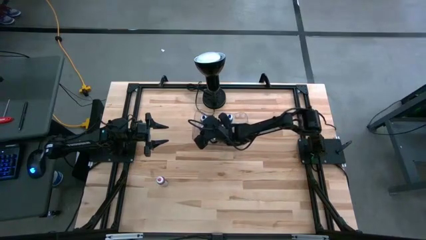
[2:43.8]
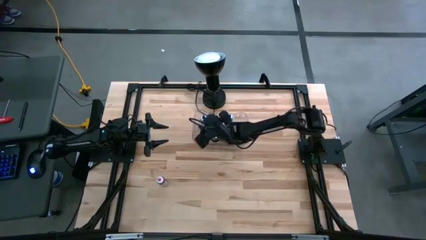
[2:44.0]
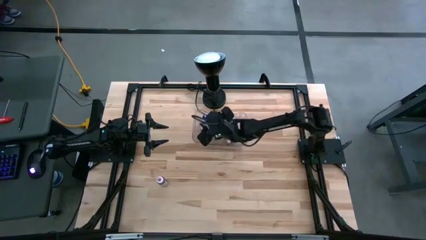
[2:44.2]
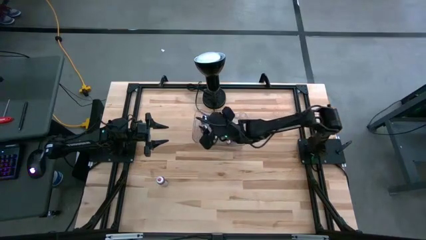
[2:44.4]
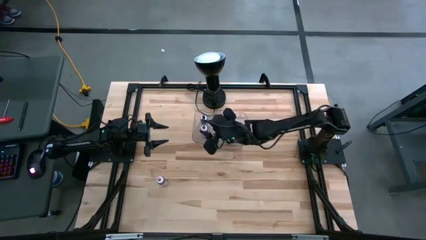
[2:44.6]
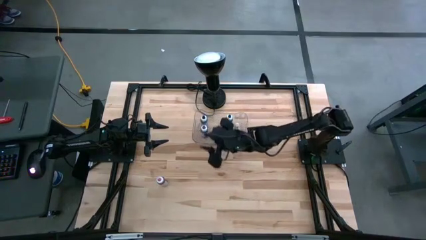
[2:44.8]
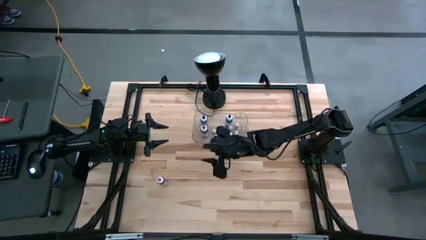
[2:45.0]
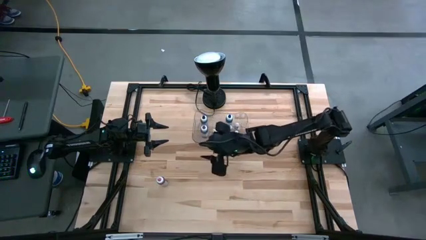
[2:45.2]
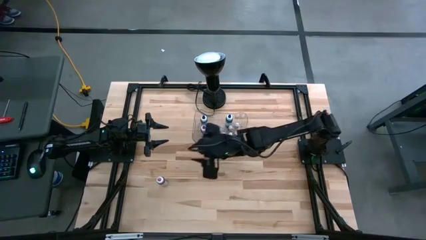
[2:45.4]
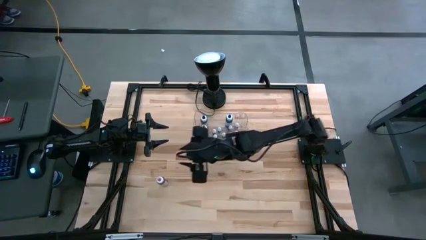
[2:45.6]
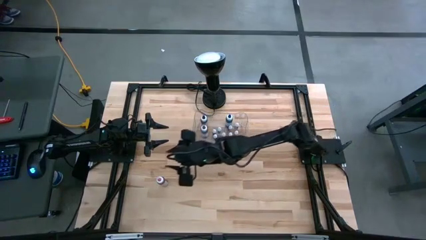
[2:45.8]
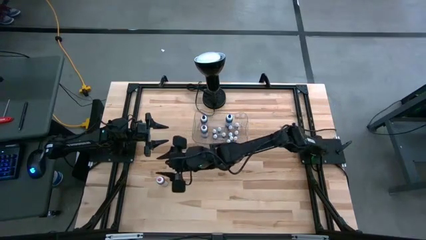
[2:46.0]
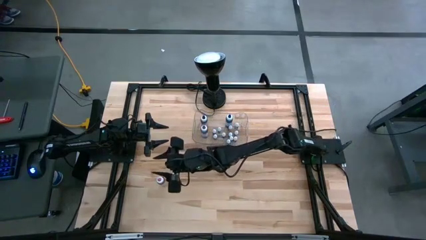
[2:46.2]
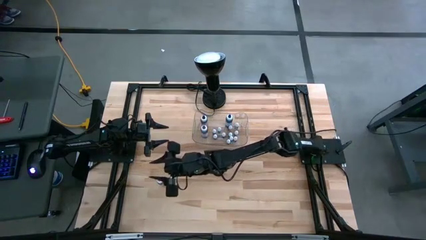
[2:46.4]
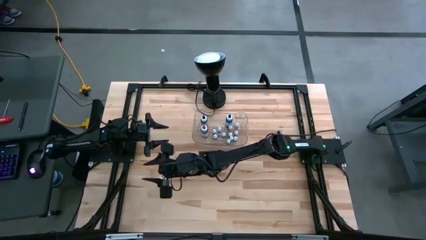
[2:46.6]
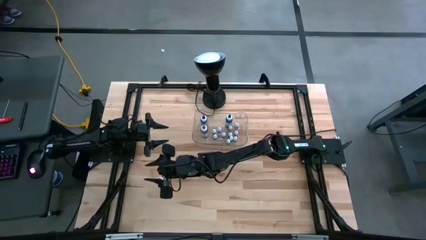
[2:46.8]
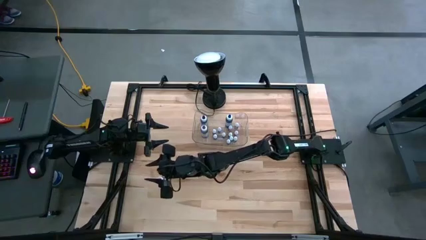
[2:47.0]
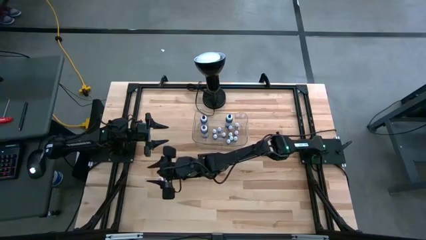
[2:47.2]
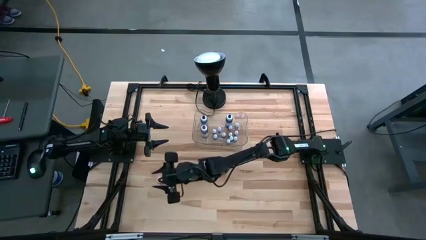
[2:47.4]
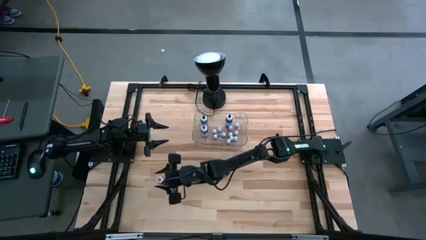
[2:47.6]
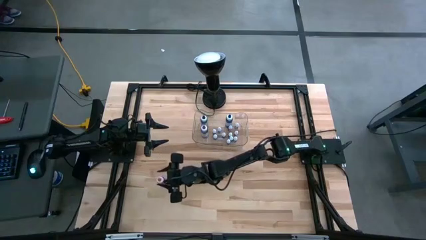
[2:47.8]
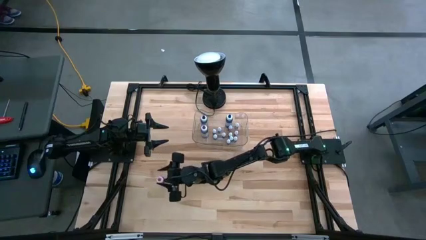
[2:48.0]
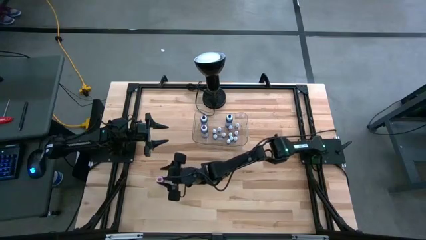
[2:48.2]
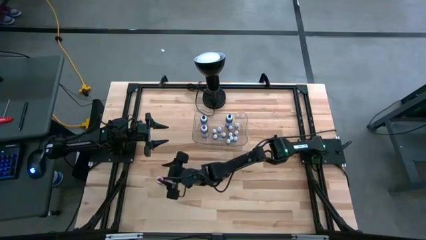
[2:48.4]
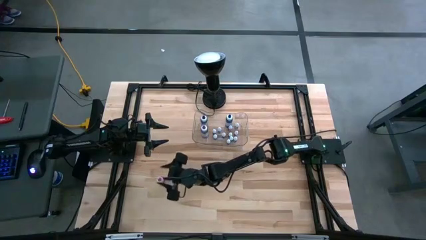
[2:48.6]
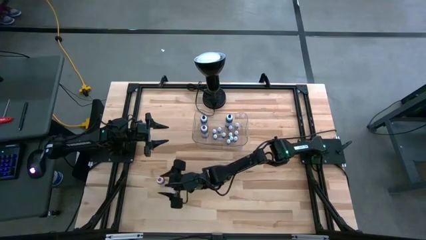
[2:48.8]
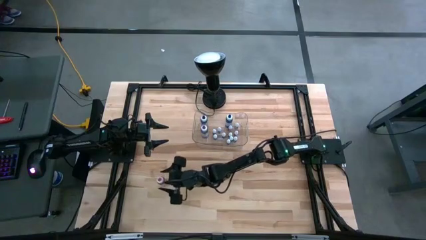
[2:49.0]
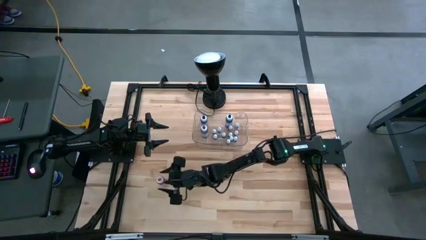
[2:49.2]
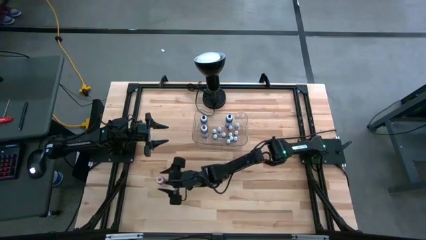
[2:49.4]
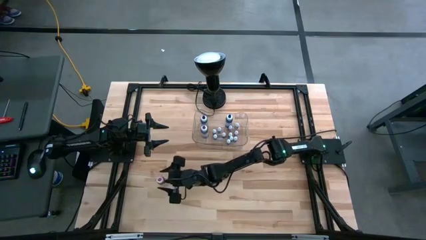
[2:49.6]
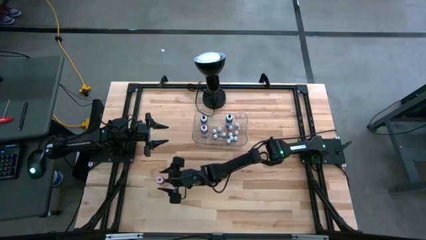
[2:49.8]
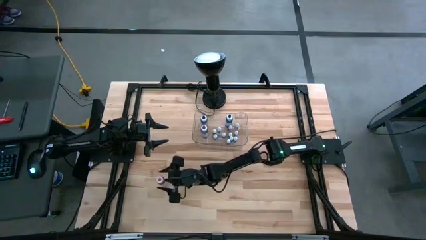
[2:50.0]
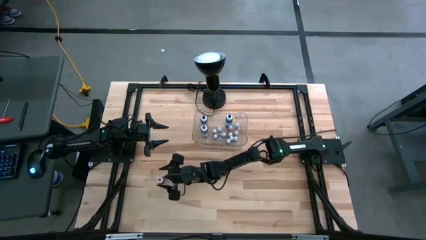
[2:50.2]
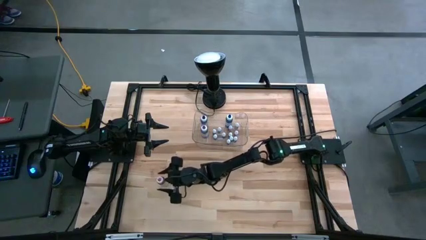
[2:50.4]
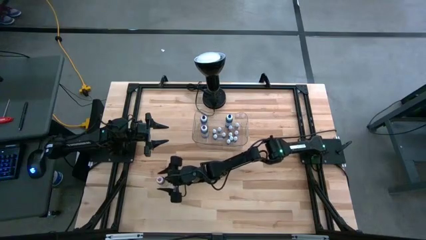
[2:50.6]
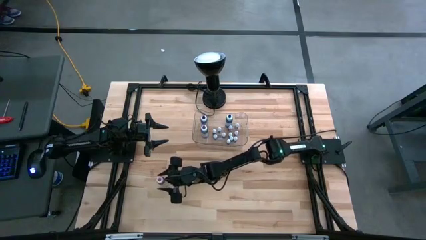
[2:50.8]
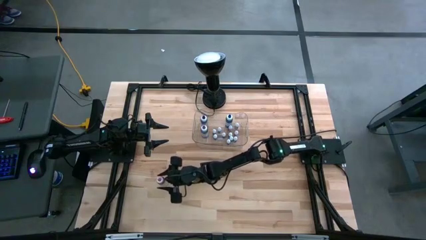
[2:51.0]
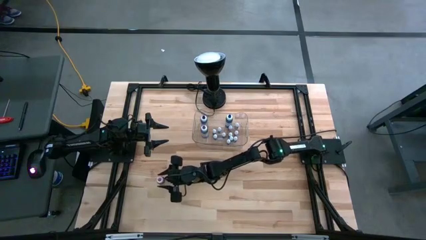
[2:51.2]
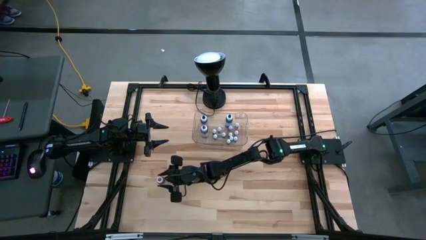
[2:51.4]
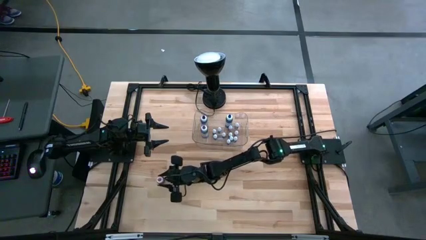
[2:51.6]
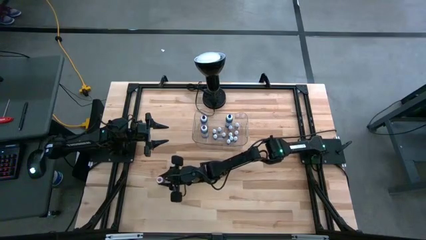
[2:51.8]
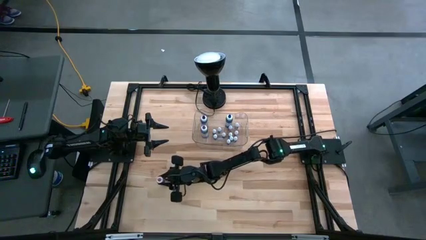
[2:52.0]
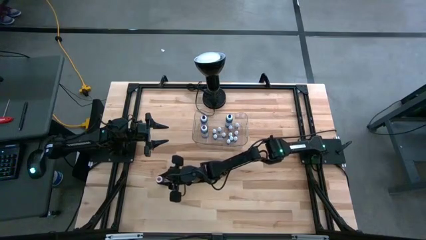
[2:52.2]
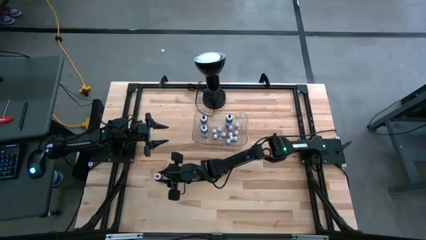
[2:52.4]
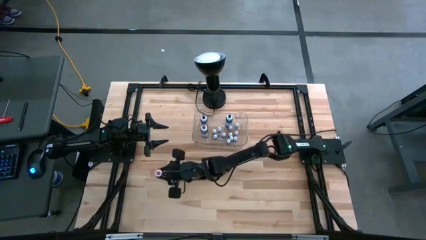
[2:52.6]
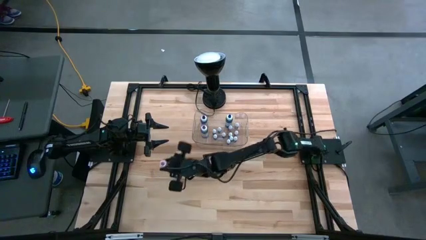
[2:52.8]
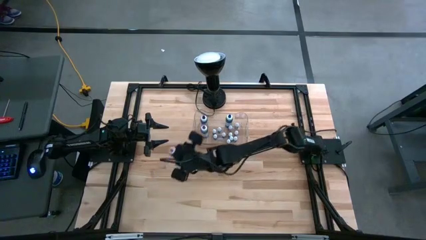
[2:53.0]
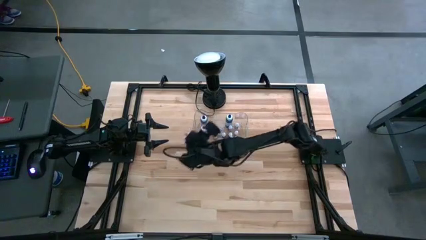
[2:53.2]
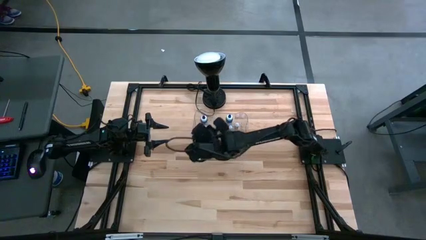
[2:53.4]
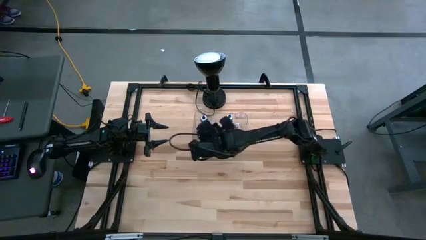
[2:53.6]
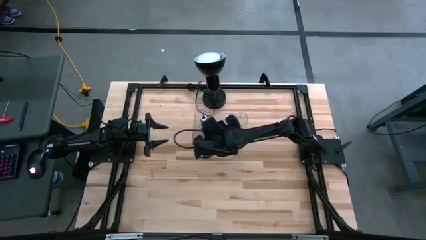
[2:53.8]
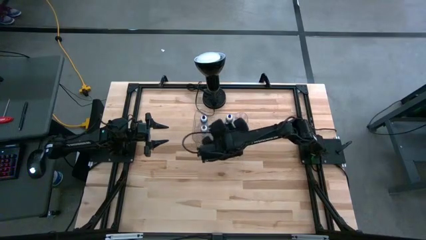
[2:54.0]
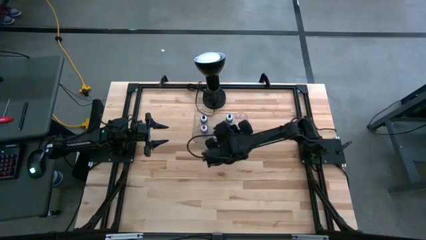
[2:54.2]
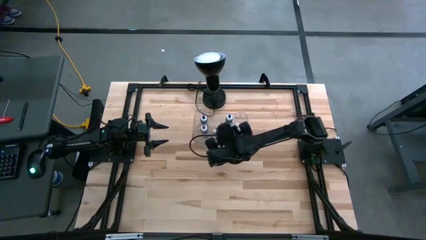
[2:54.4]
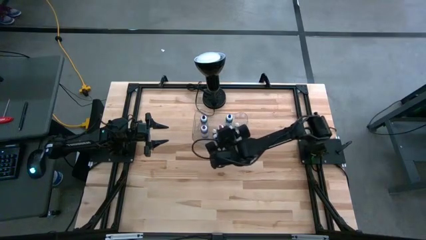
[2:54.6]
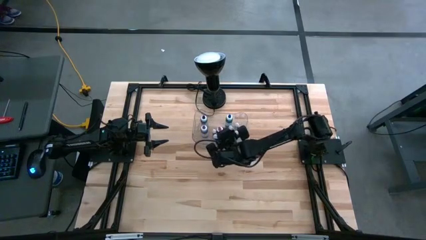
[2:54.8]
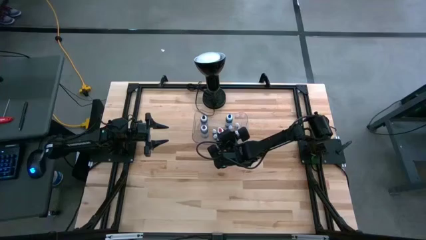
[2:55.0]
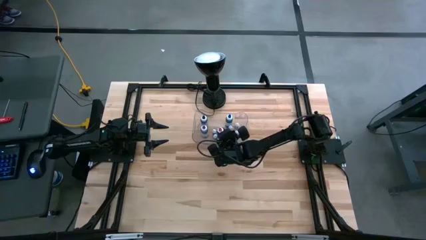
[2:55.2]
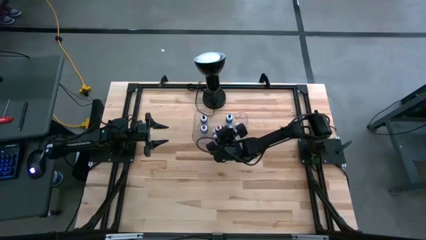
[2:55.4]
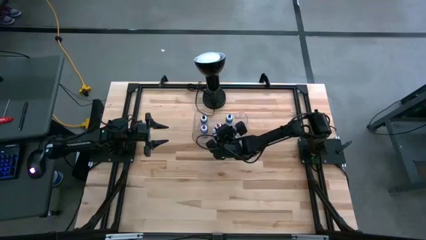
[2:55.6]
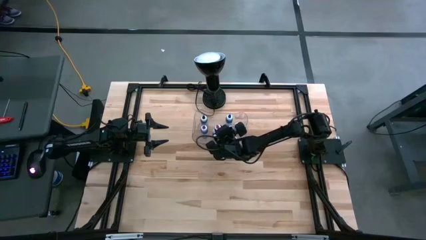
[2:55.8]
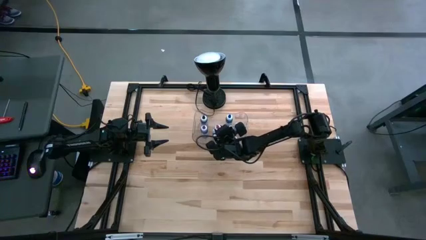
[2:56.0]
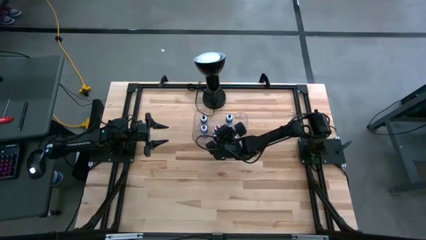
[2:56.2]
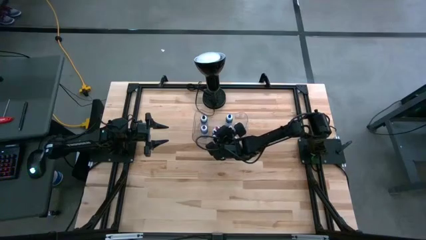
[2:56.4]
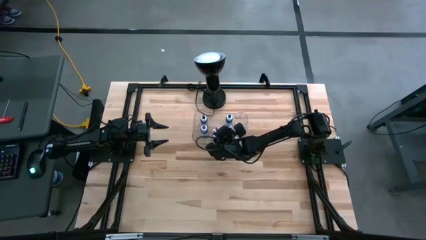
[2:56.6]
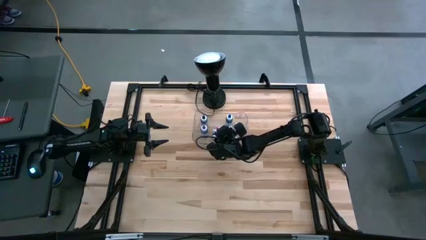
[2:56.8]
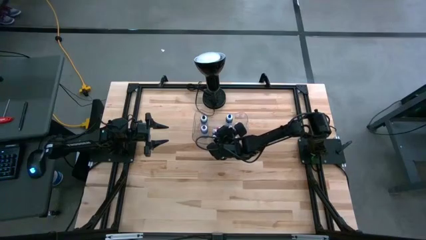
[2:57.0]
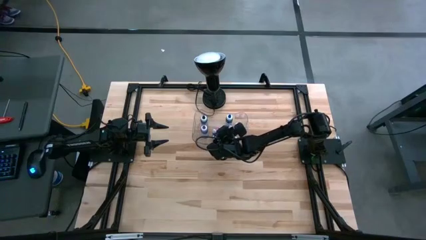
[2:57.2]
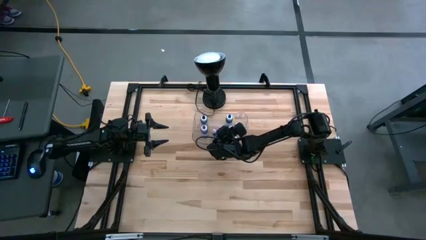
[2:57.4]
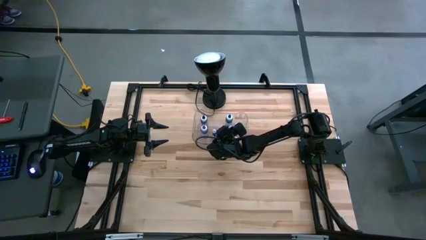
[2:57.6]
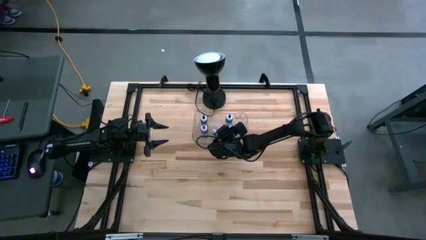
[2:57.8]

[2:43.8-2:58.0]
Task: Pick & Place food coloring
Put the large pink food coloring bottle into the transparent bin
